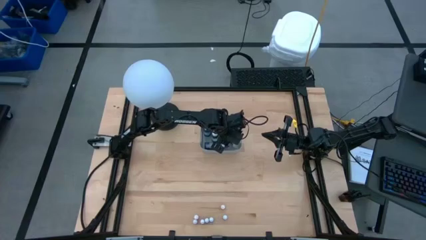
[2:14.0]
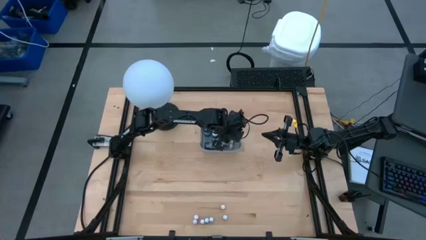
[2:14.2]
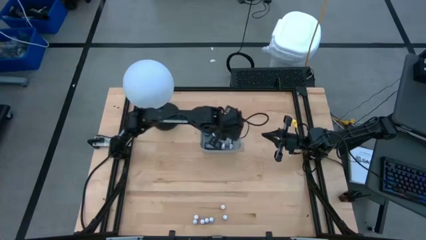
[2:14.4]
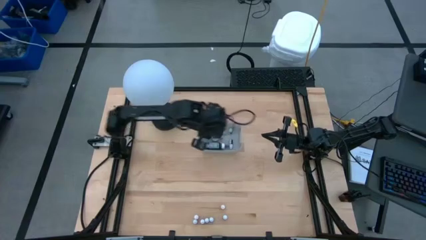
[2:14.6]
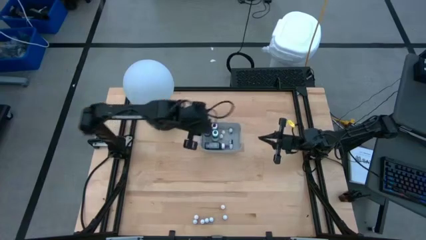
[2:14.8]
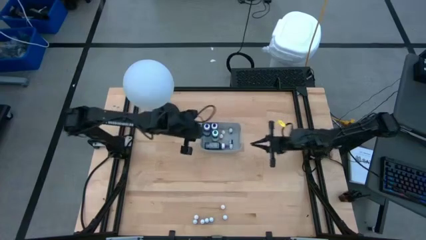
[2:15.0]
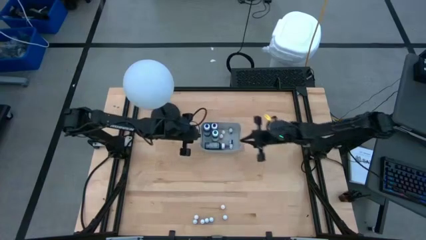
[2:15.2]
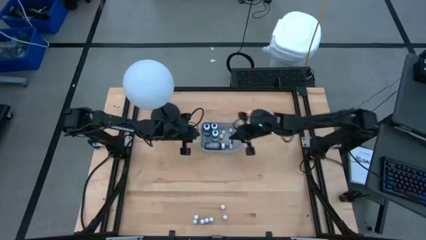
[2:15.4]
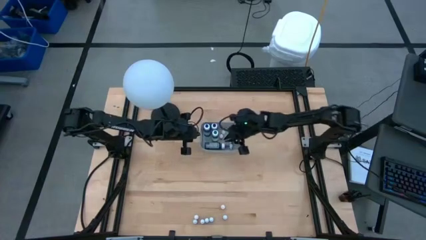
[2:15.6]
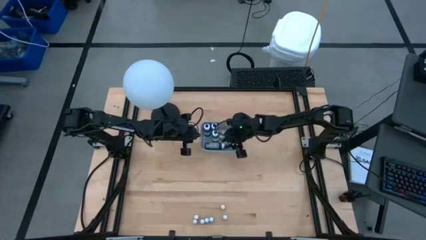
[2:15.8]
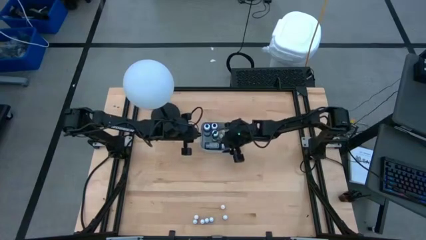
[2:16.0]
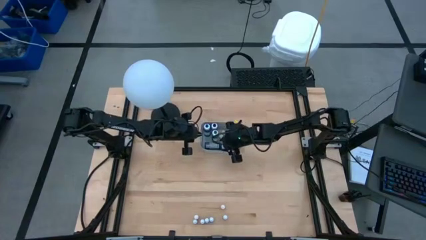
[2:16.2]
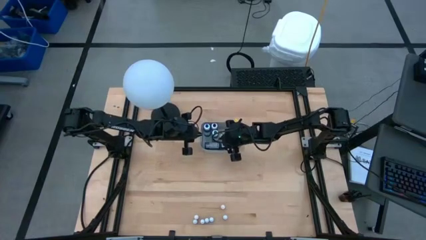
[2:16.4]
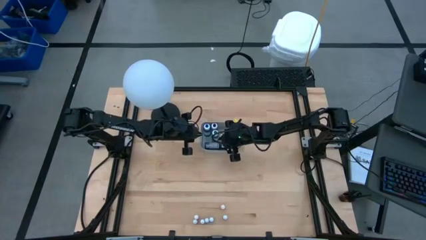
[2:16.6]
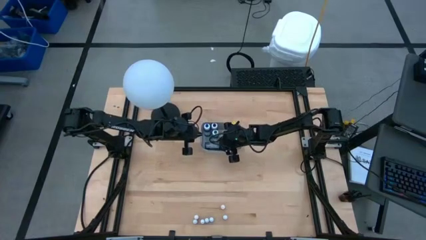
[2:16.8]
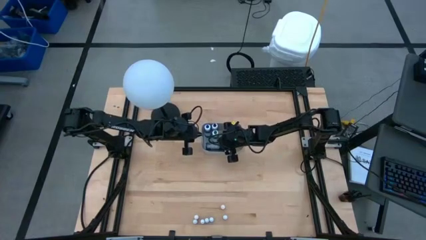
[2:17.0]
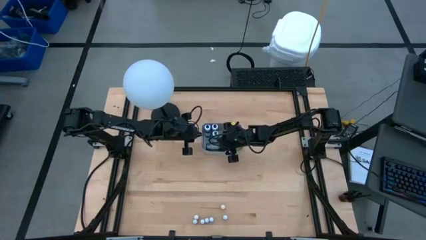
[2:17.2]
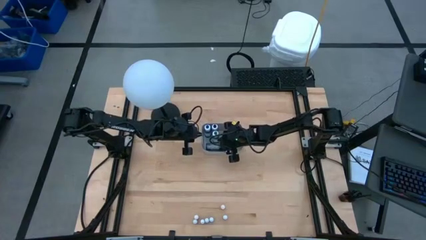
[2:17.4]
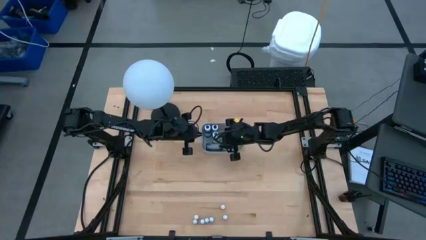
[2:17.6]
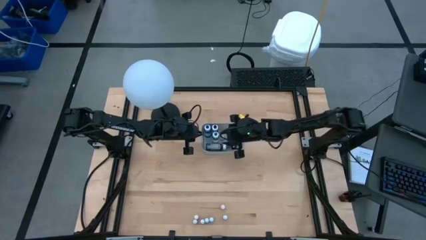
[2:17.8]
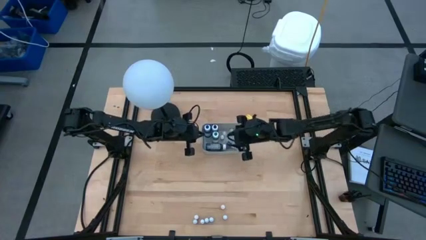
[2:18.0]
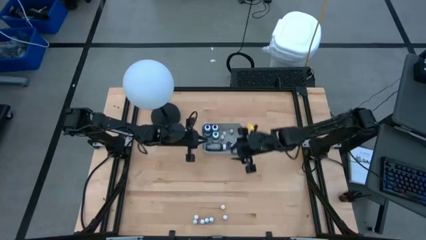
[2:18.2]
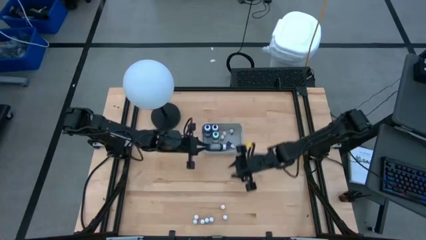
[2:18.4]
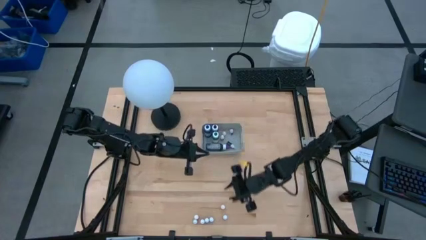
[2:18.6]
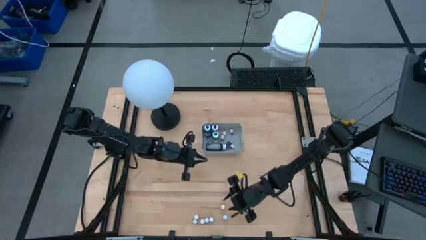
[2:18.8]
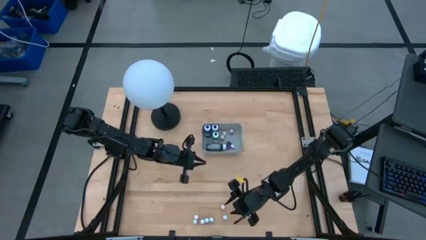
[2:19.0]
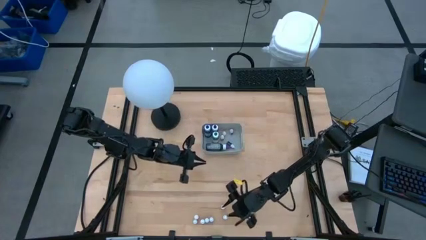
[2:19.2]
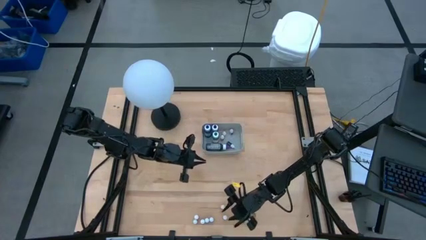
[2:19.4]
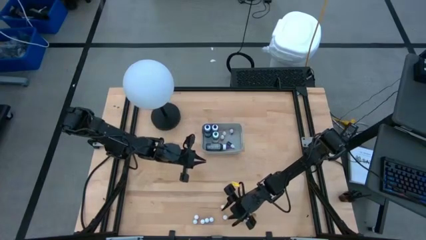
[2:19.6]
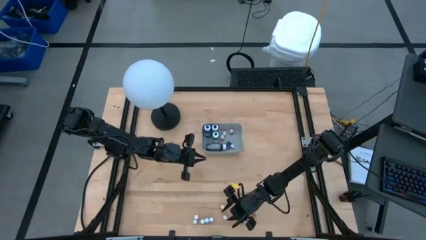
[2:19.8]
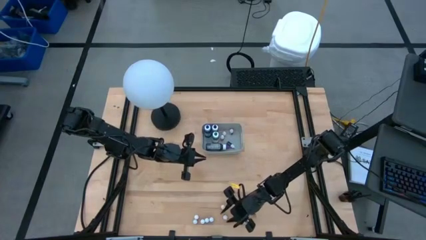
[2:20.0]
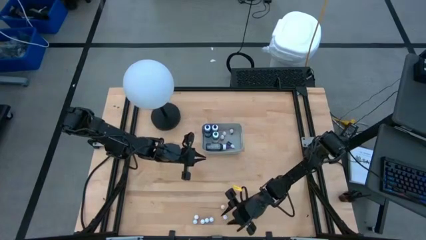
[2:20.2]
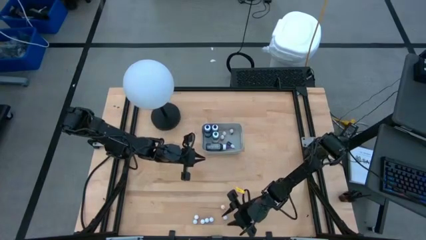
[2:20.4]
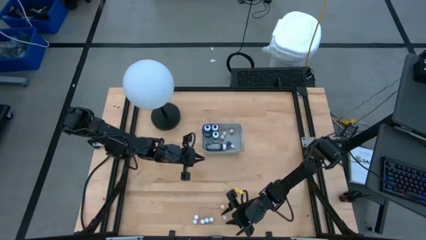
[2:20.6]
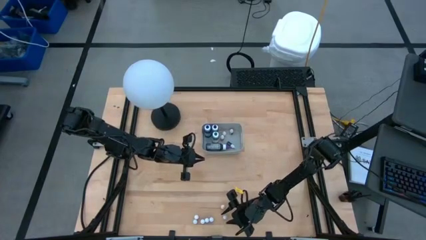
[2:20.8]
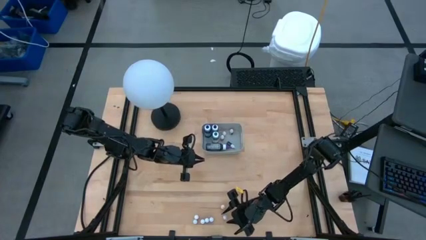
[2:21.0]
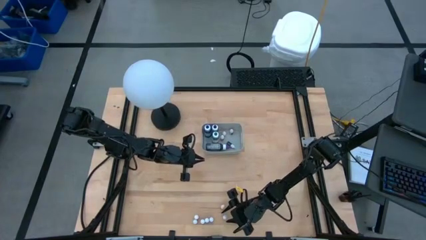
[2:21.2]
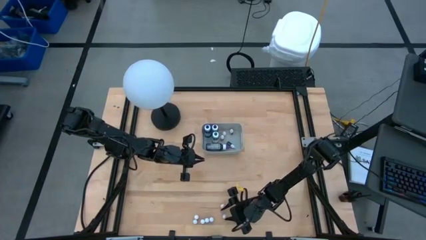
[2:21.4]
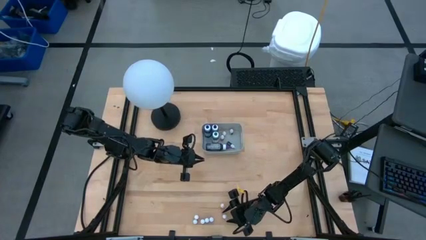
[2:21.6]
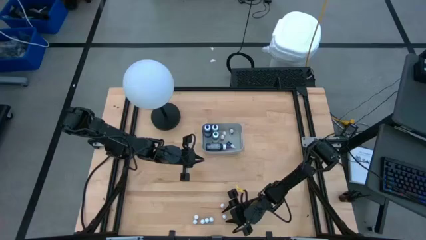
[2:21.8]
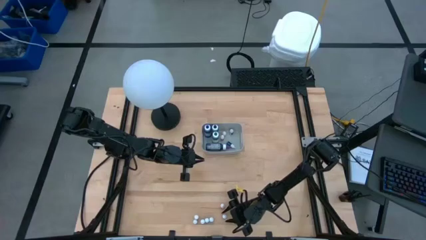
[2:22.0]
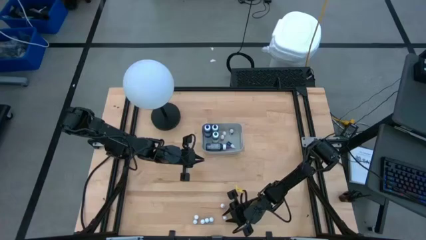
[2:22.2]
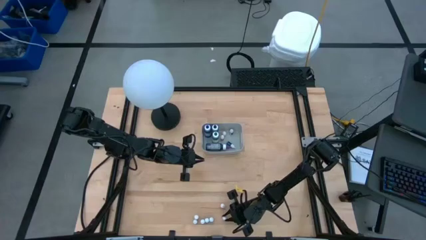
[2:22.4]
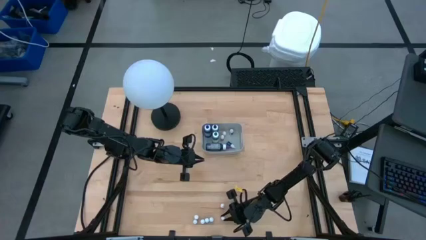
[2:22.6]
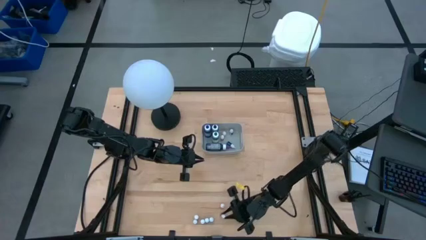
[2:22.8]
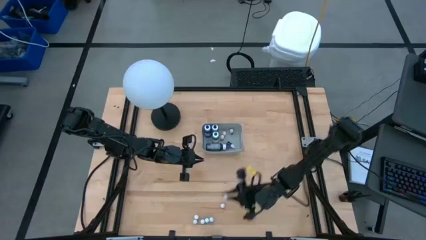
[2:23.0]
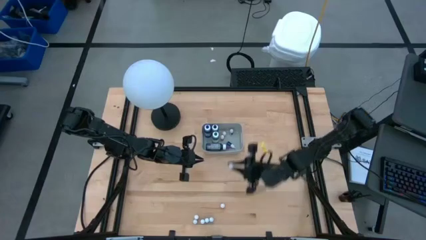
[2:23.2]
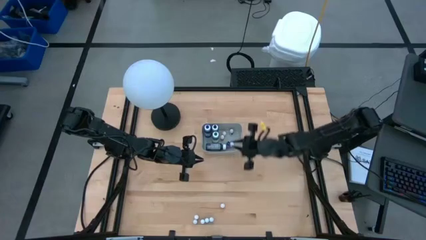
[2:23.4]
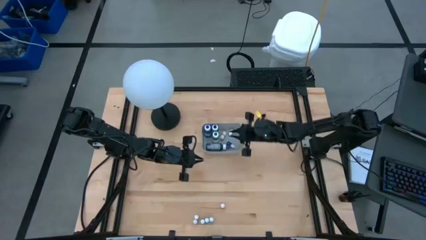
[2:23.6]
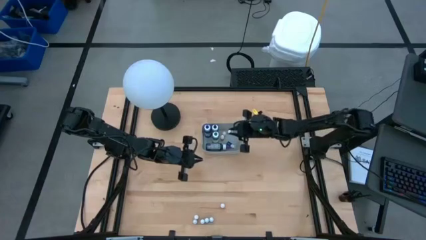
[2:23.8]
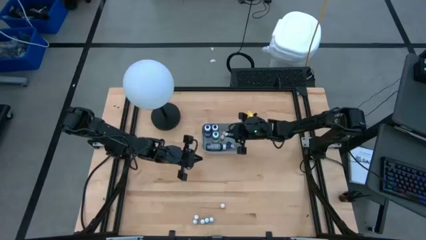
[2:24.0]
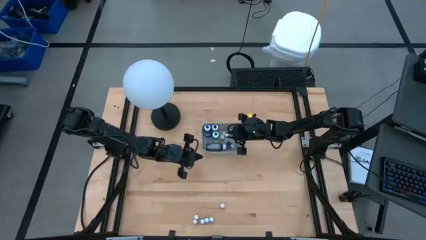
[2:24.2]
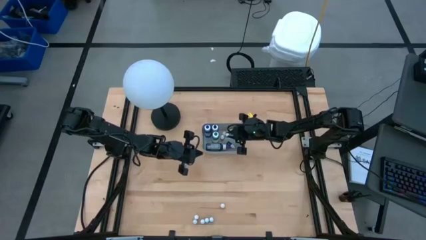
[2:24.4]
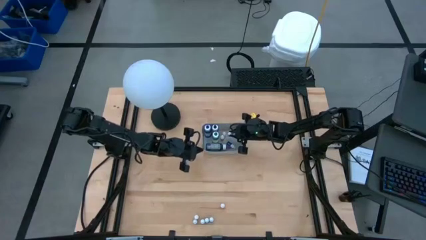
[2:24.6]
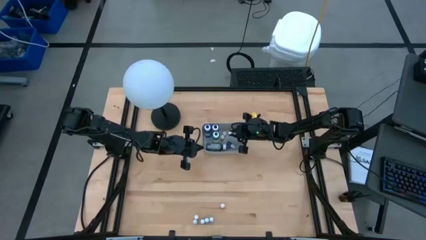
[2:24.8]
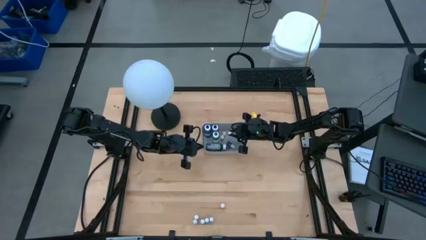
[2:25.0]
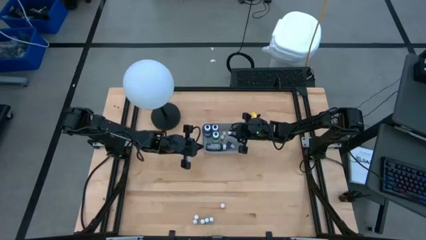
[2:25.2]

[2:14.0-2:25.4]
Task: Pick & Place food coloring
Put the small red food coloring bottle into the gray bin

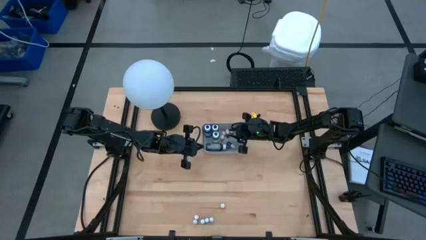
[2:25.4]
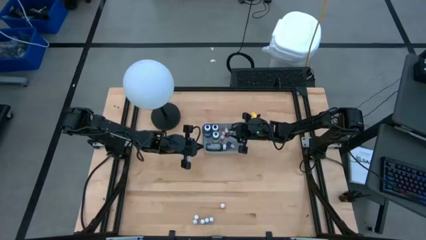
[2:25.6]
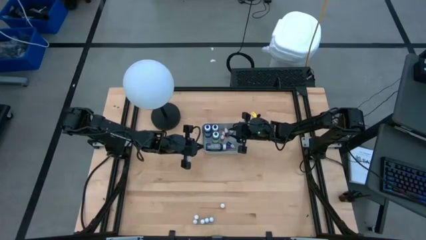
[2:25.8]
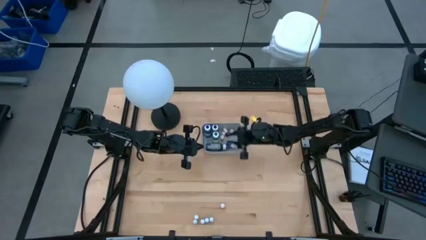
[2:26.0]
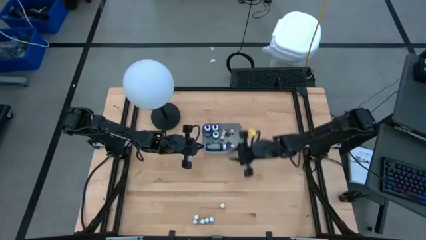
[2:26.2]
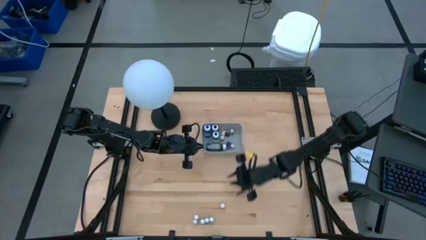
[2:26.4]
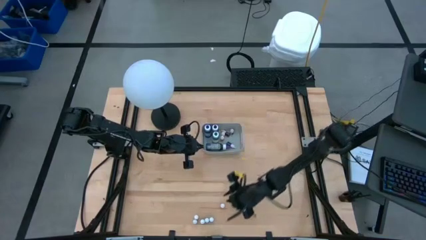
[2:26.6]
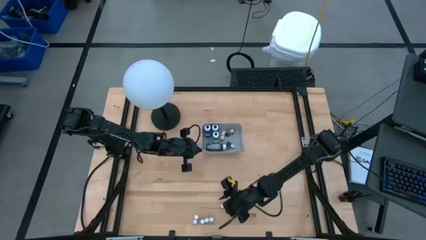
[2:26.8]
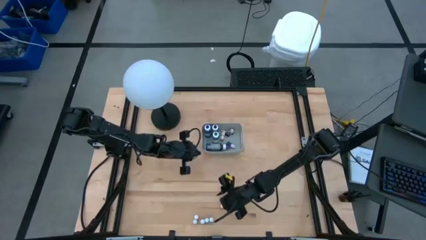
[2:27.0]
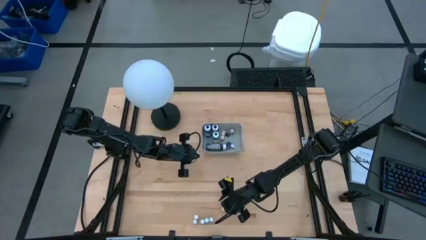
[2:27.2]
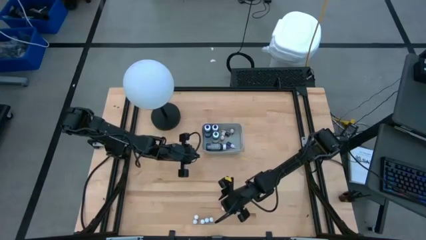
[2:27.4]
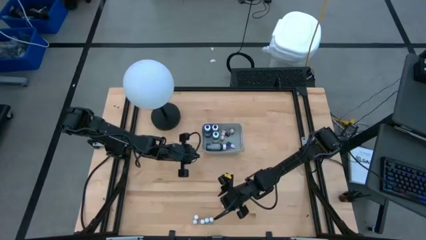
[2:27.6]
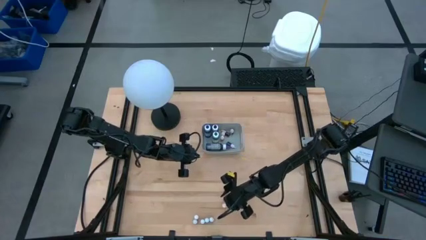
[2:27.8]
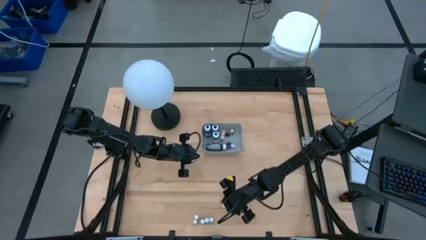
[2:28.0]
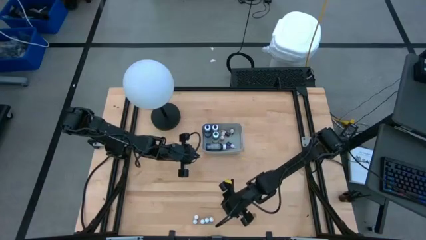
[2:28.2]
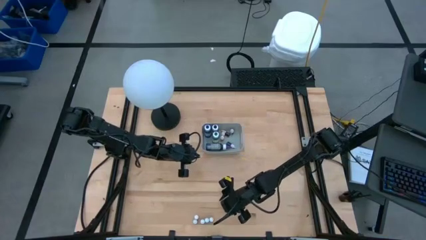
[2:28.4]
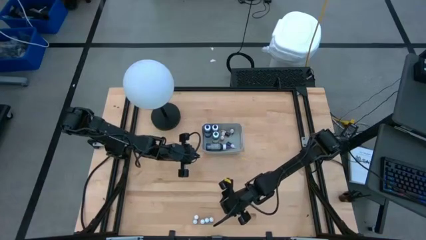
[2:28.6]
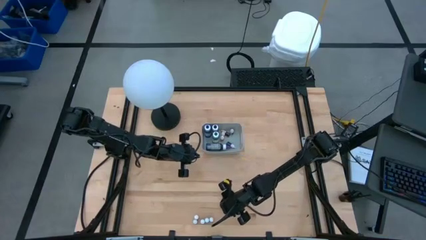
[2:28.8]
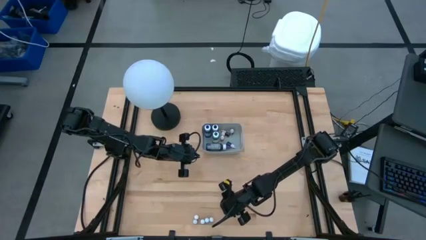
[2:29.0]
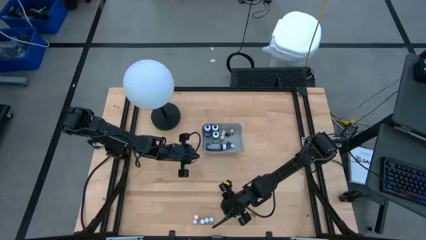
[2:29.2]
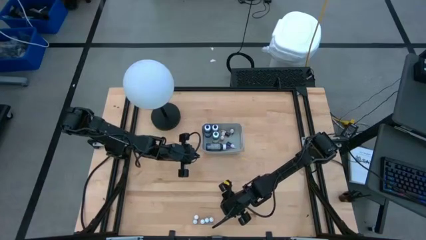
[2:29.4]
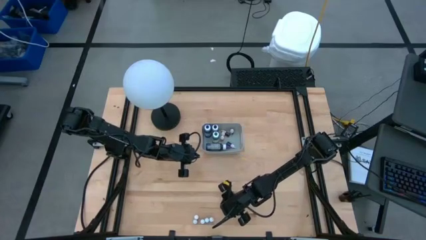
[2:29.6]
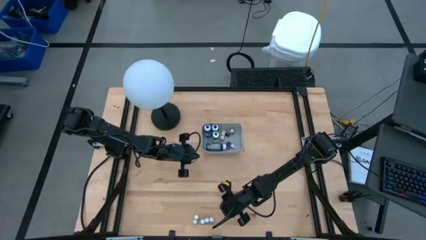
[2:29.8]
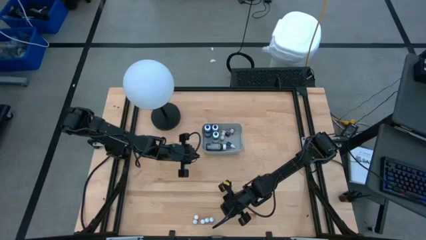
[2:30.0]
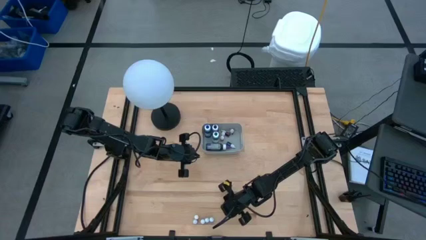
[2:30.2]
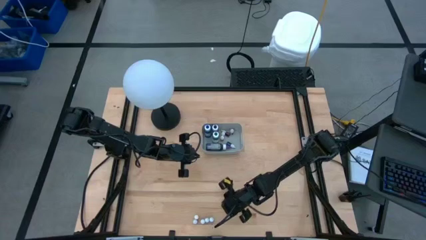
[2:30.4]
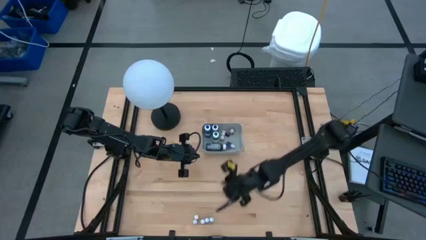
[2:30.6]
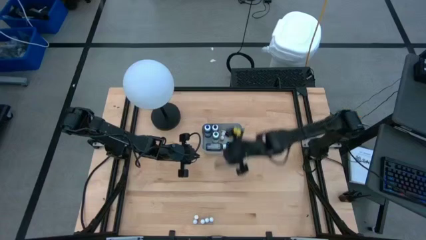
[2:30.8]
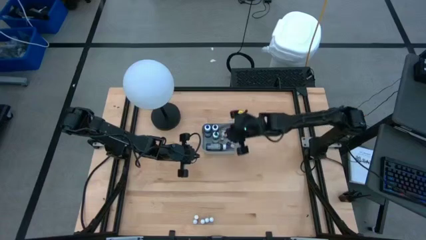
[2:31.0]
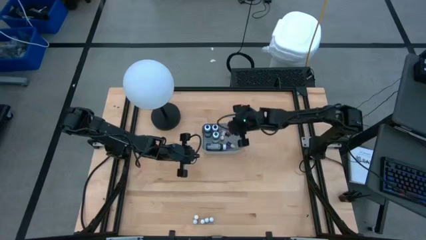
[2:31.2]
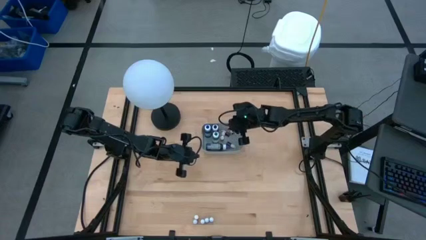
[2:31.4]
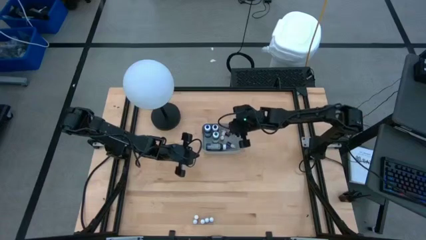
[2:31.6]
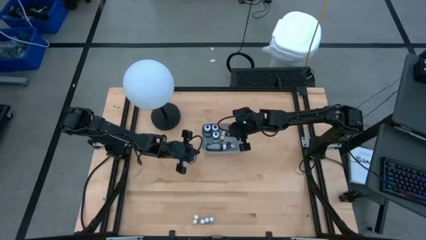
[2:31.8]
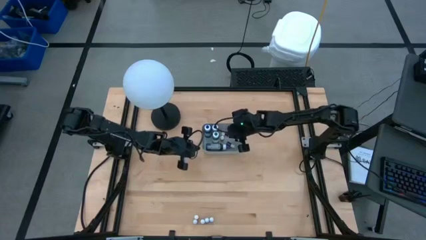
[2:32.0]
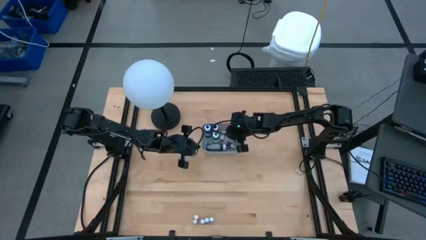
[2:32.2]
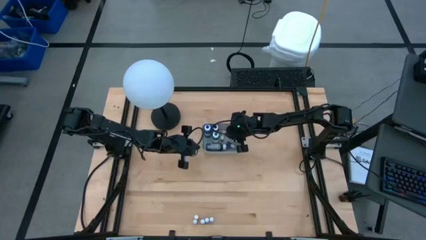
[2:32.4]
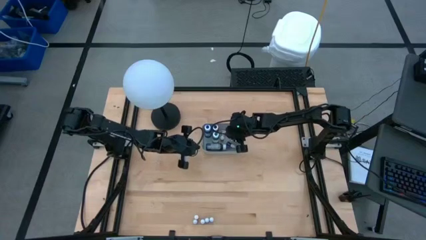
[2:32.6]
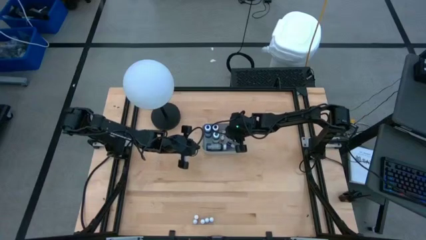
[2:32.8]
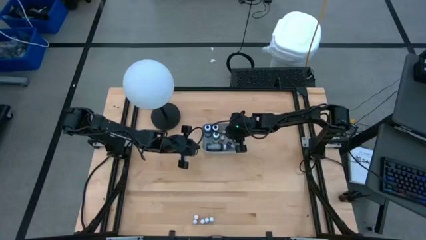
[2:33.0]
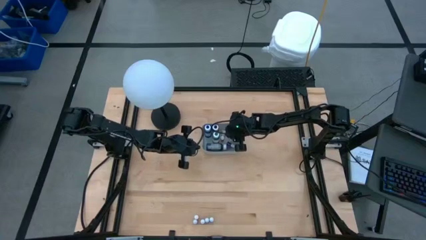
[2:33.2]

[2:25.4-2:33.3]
Put the right small yellow food coloring bottle into the gray bin
